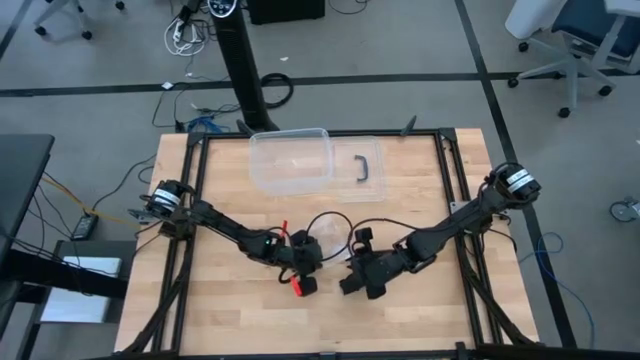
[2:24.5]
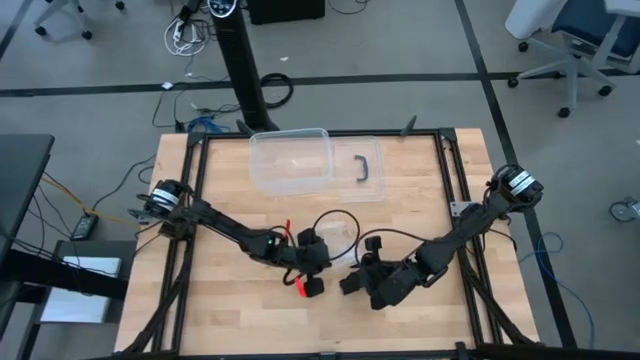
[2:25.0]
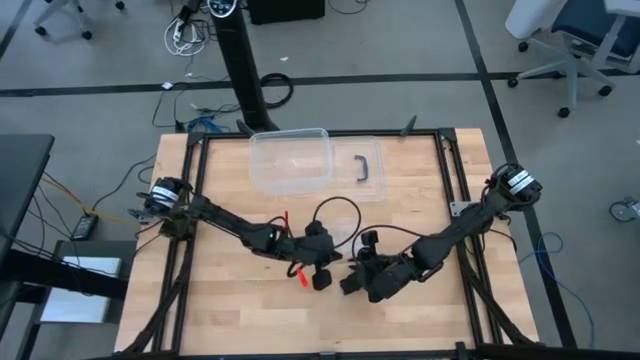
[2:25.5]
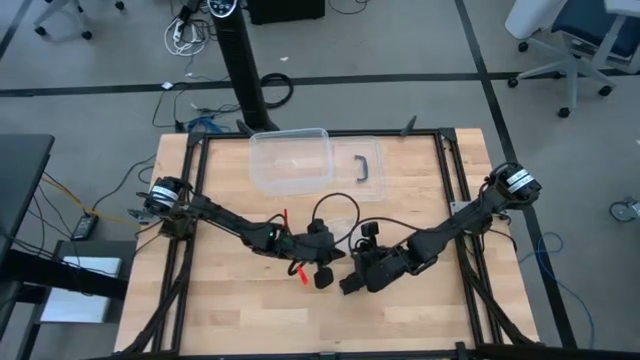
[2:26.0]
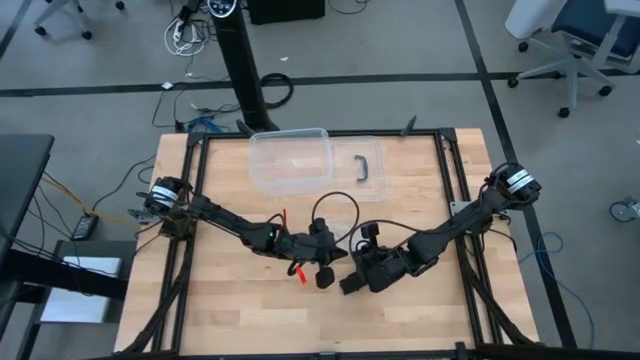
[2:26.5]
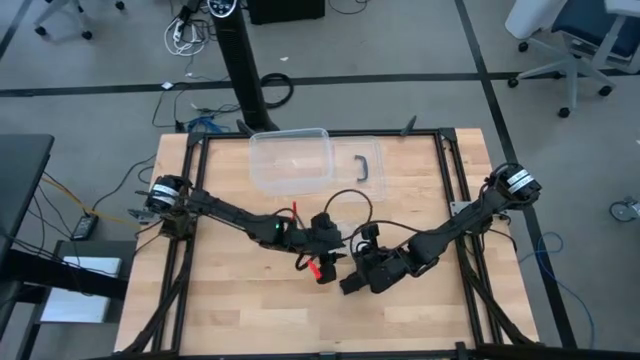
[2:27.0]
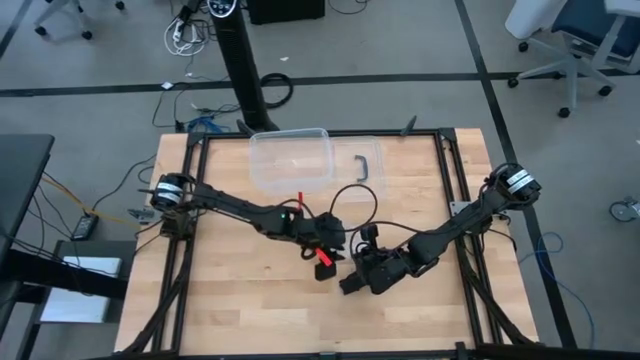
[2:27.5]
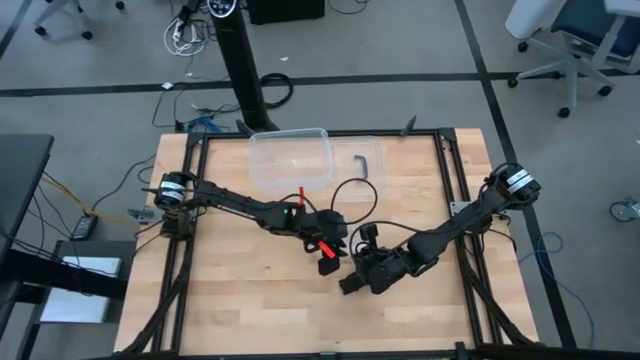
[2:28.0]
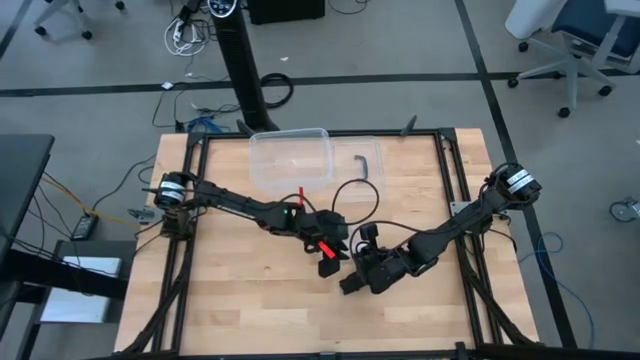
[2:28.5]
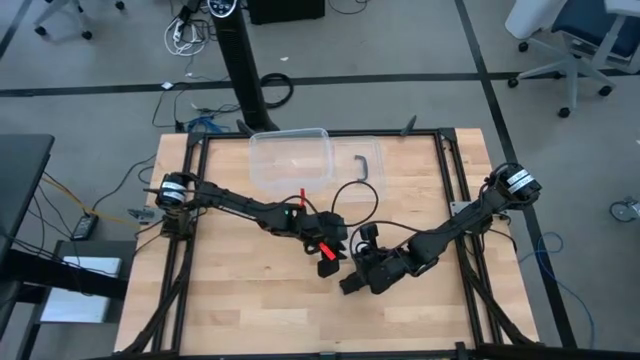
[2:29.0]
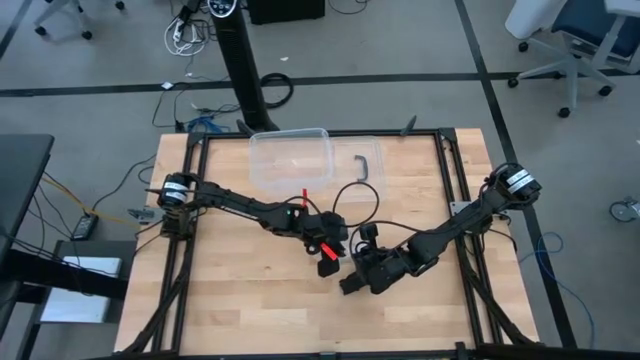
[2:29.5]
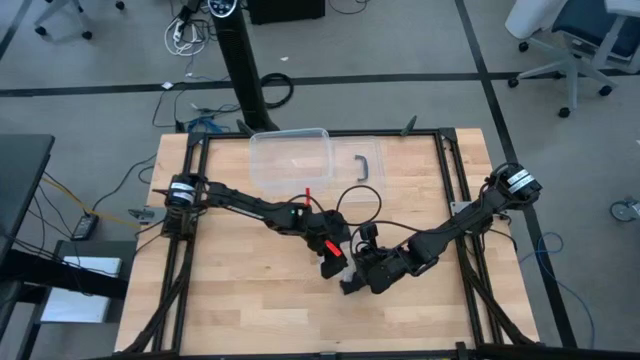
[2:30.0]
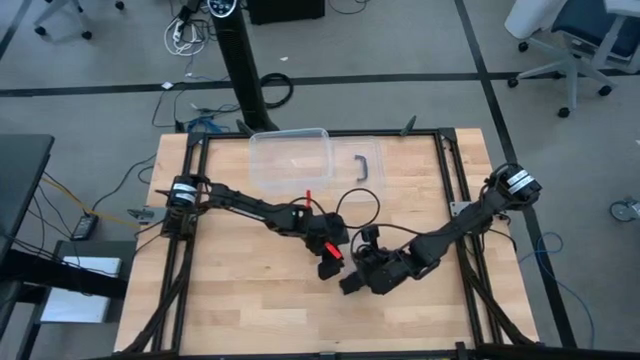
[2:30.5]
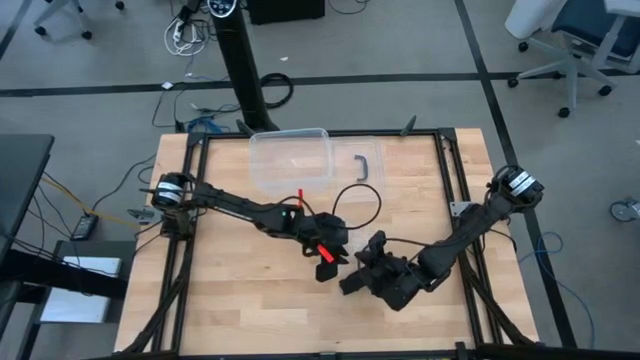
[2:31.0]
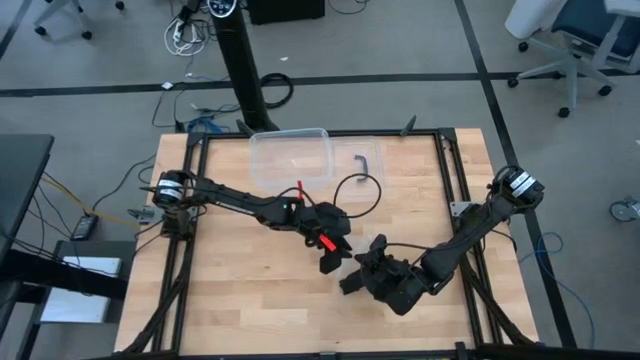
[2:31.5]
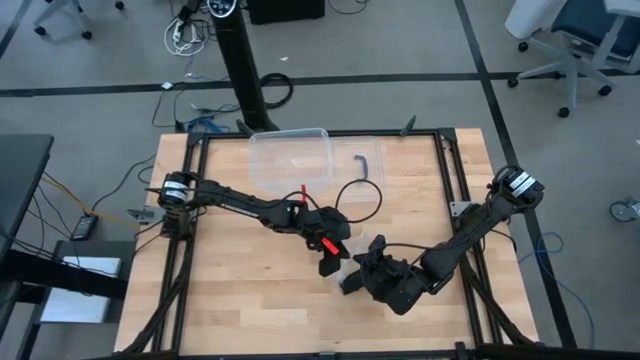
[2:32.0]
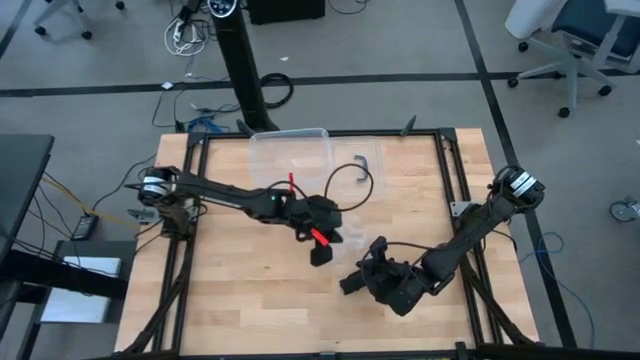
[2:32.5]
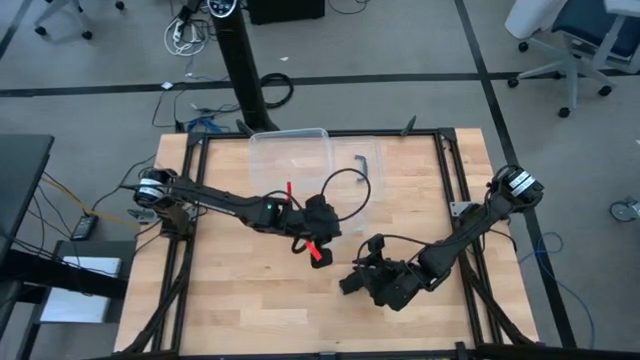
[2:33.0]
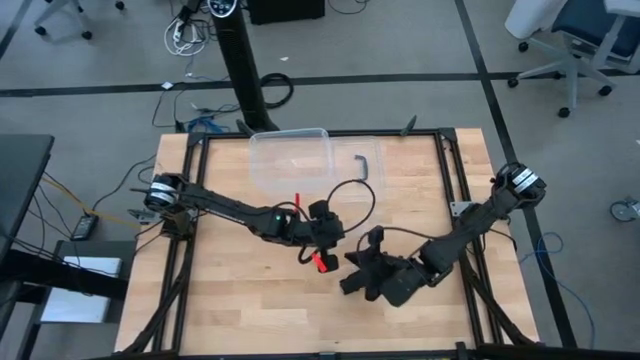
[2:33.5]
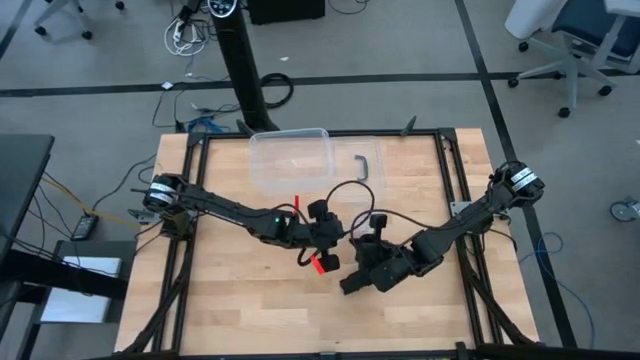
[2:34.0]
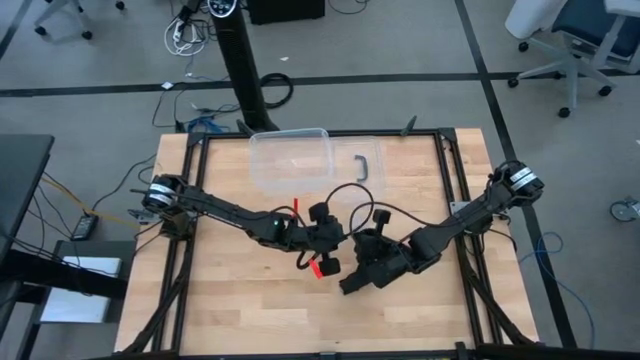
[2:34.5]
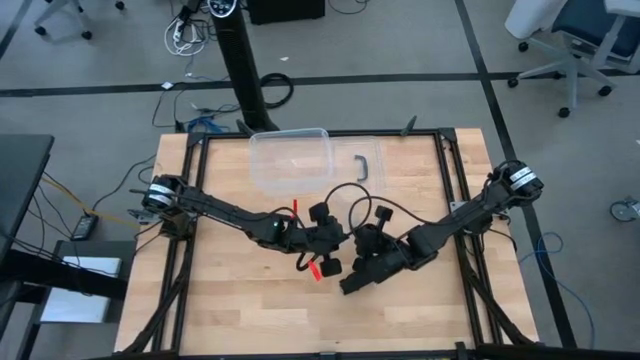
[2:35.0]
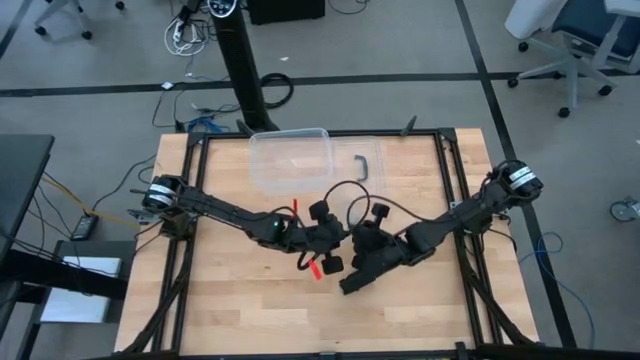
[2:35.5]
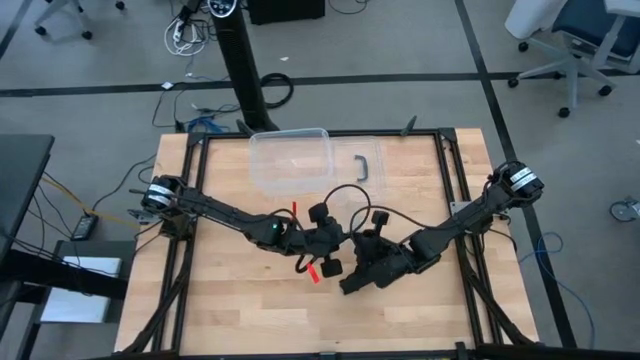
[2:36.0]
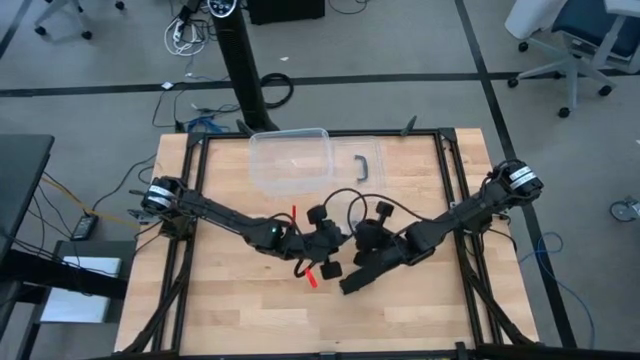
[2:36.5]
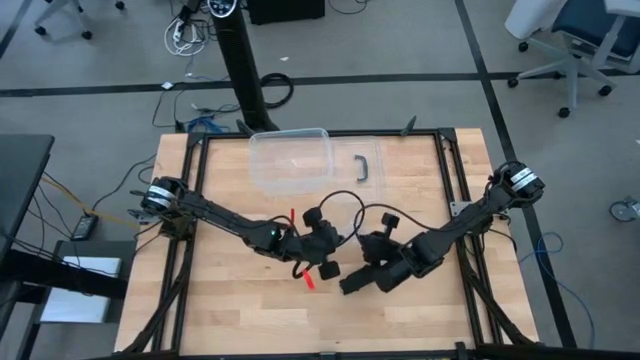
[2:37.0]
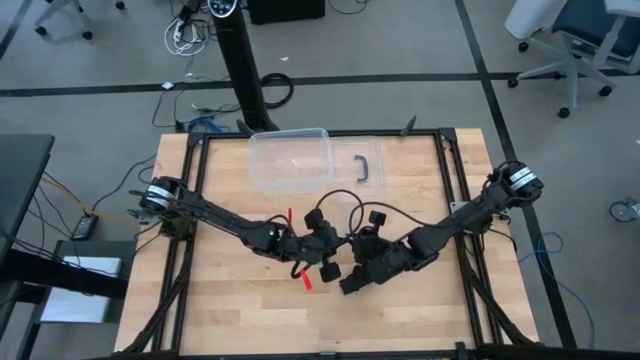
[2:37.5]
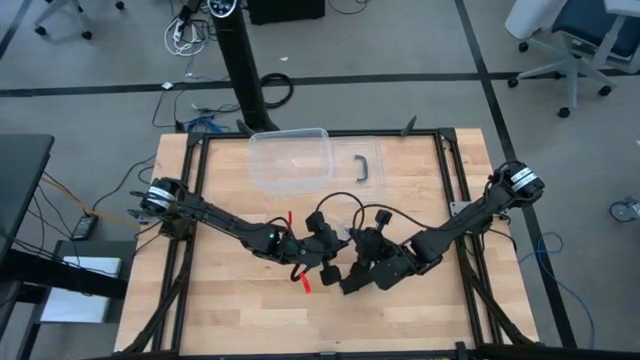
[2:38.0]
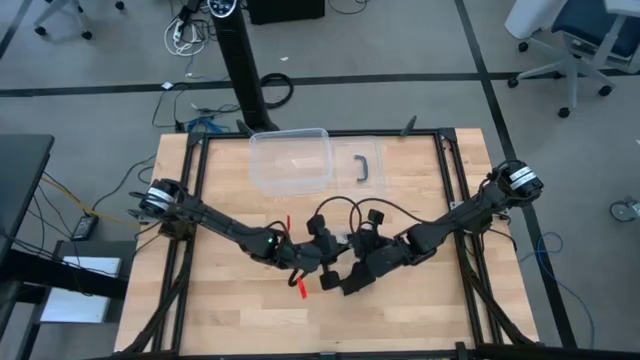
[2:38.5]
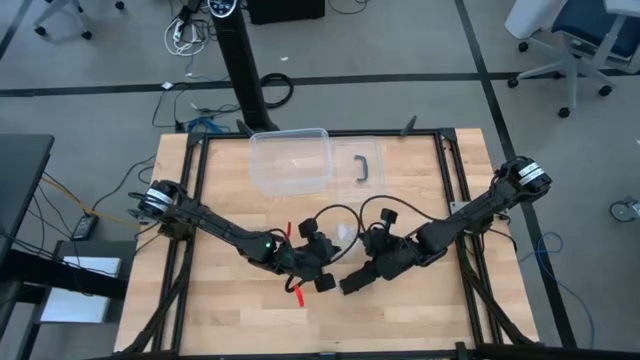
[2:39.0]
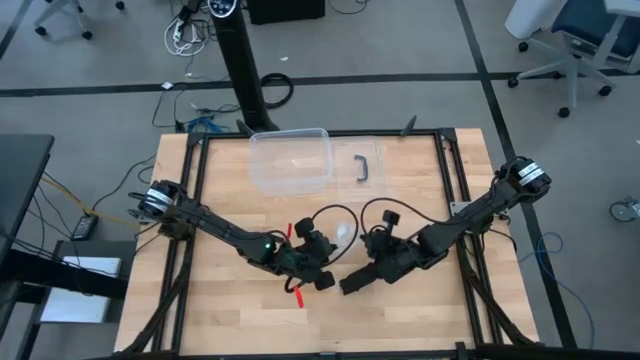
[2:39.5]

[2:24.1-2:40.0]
Task: Roll bandage
Open the transparent zip bag

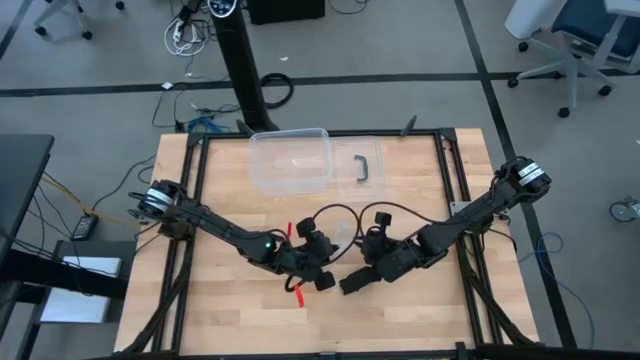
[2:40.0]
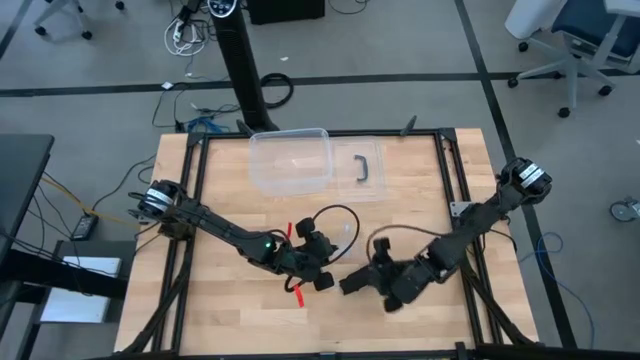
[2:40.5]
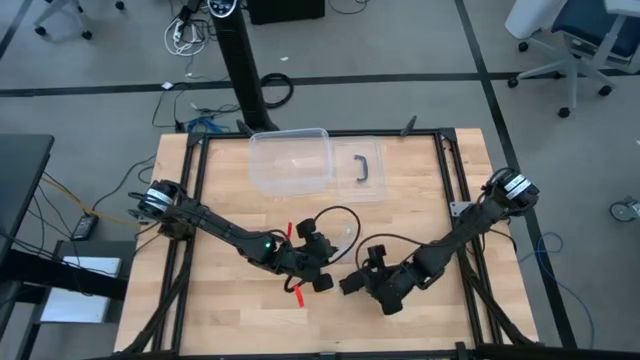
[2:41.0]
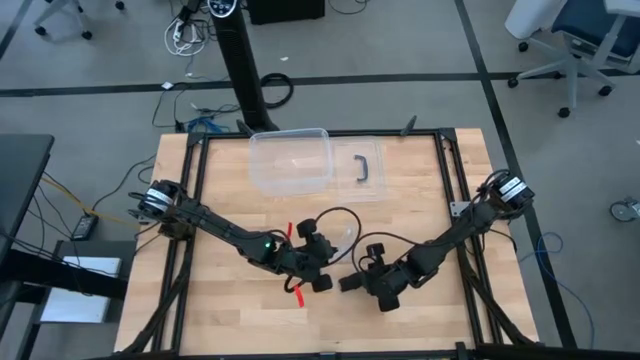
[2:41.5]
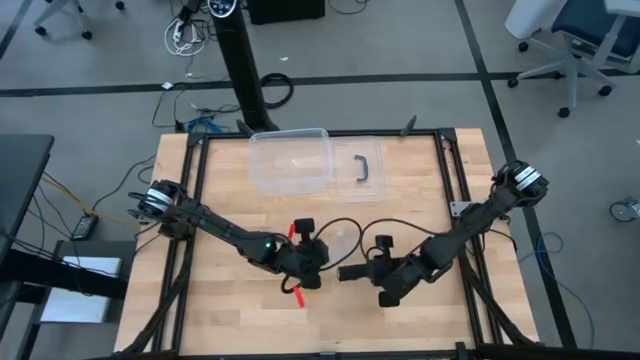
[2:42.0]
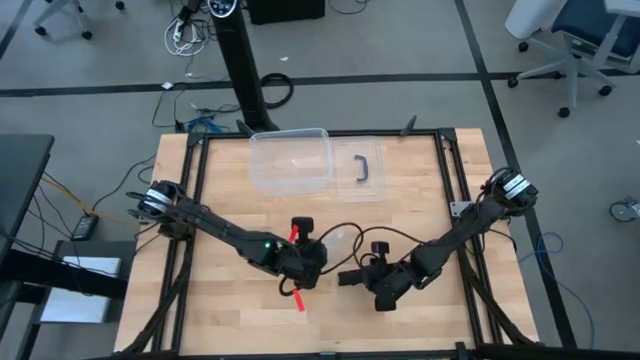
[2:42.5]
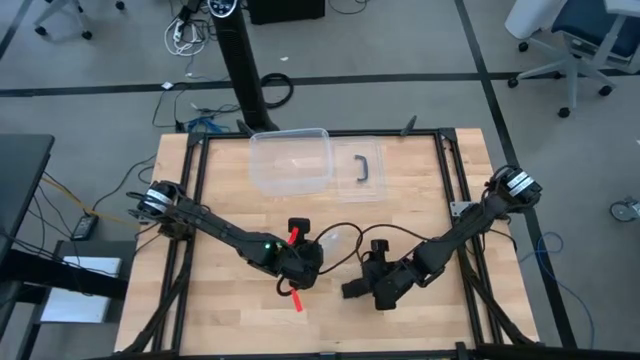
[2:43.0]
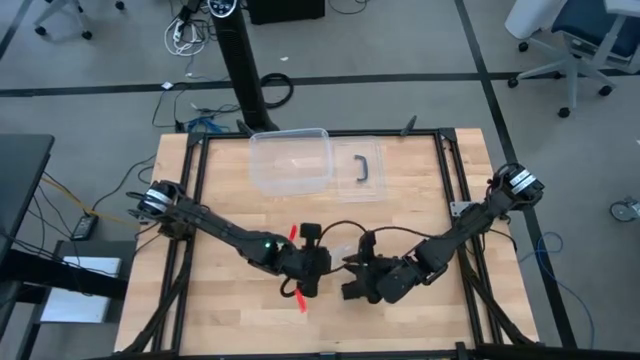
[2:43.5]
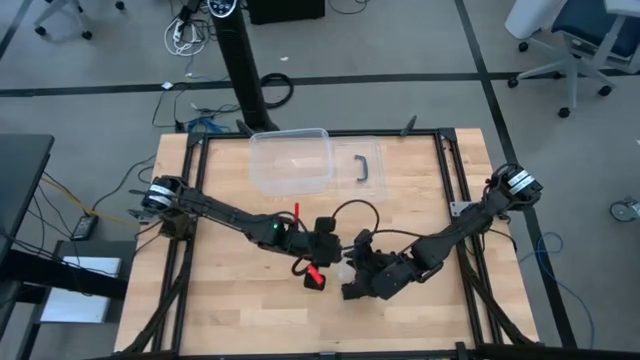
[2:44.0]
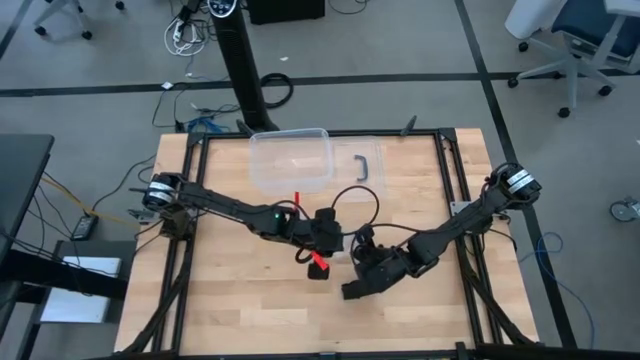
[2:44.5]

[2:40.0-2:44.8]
Open the transparent zip bag
